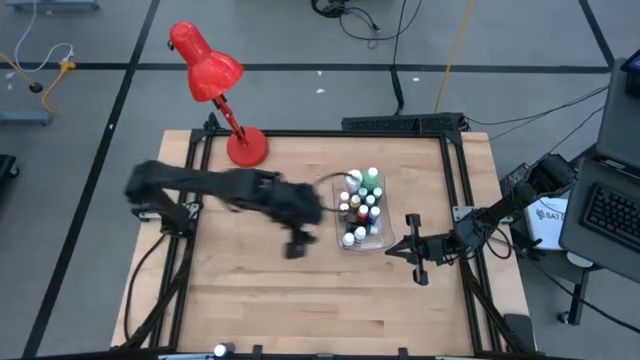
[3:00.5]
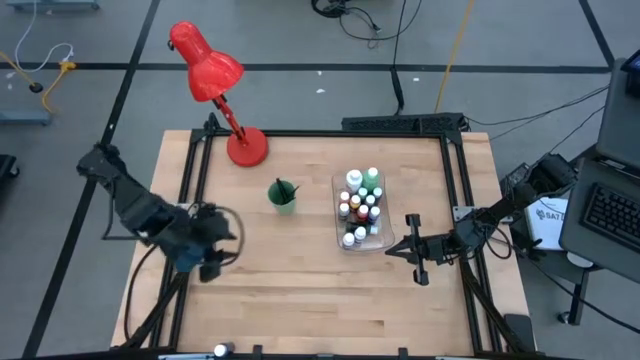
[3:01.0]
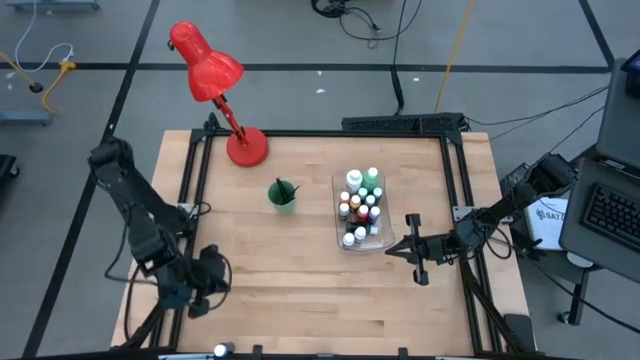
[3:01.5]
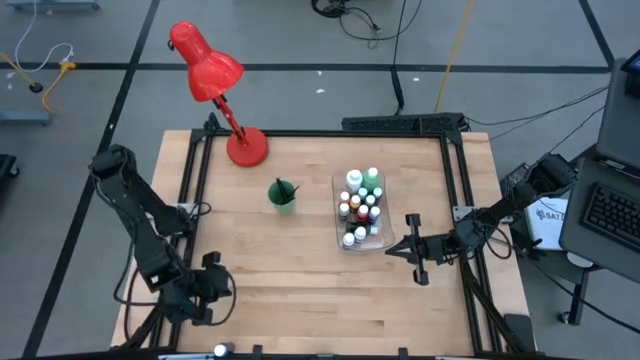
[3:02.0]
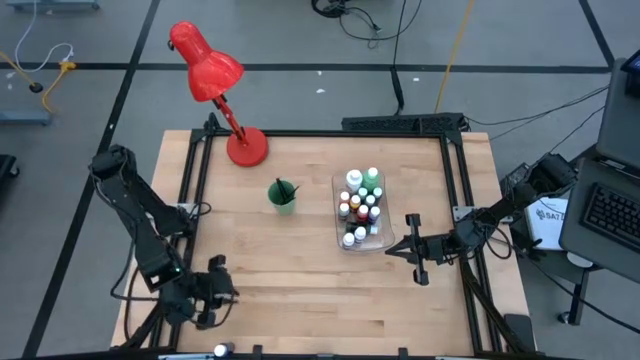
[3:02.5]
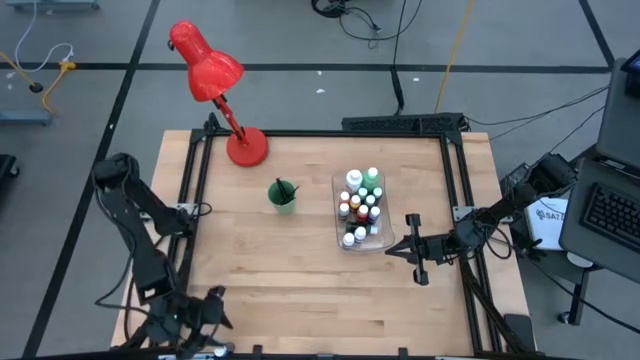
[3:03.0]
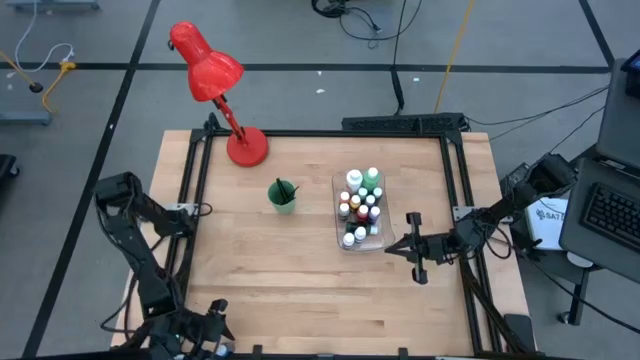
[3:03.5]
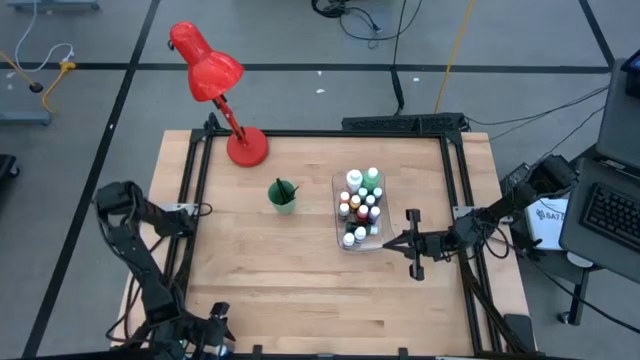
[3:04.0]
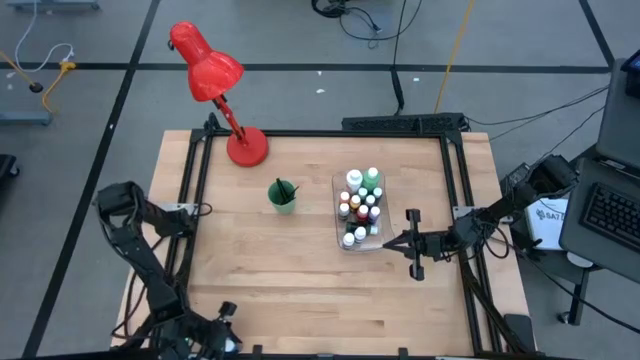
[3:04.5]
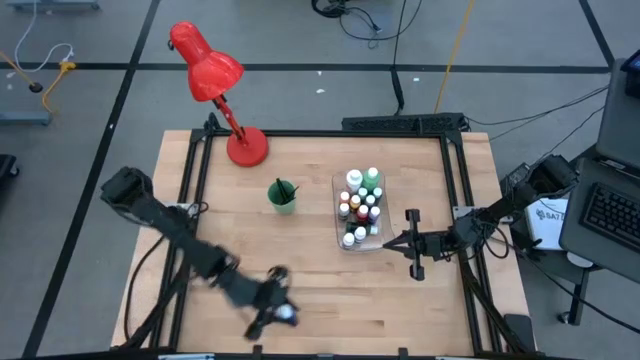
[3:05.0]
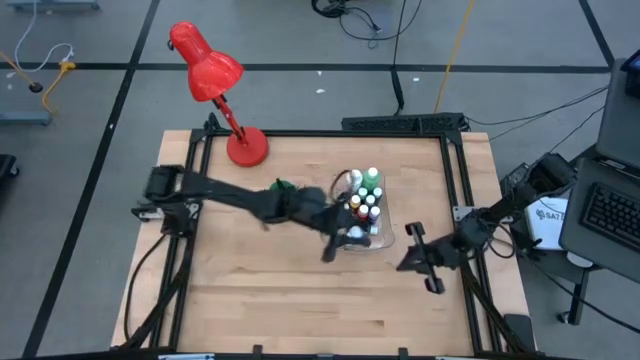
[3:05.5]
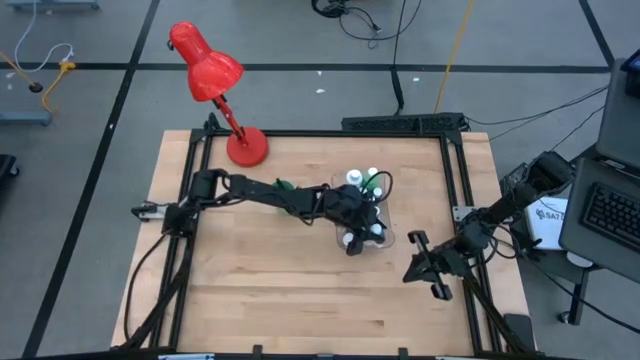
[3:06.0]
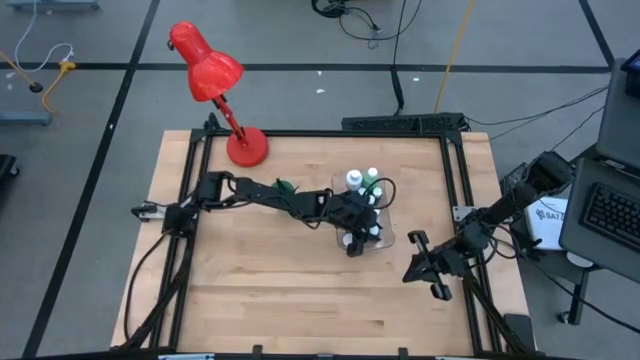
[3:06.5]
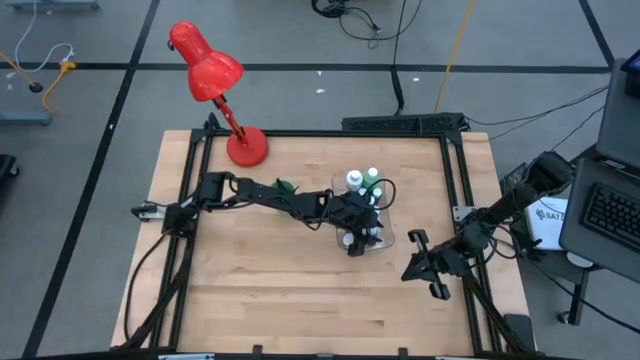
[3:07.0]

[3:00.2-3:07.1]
Task: Pick & Place Paint Supplies
Put the small blue paint bottle into the transparent bin

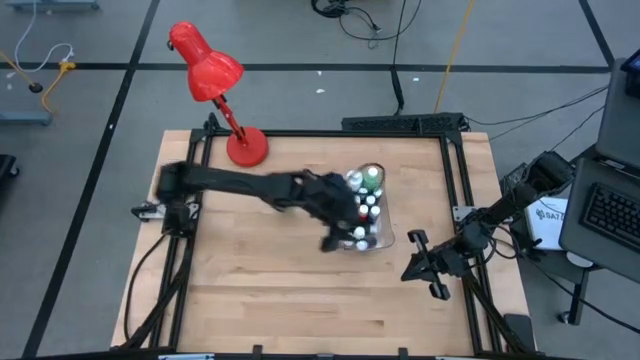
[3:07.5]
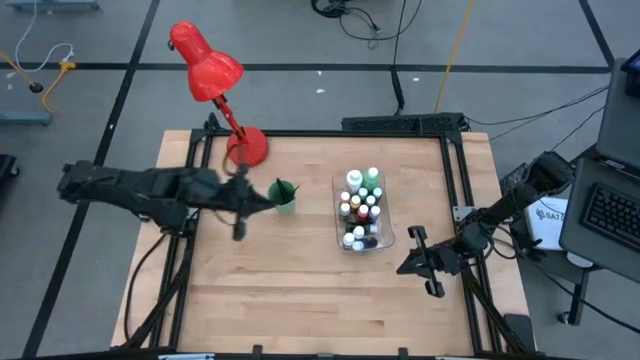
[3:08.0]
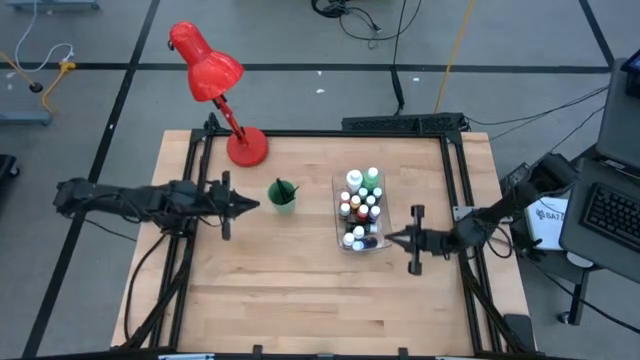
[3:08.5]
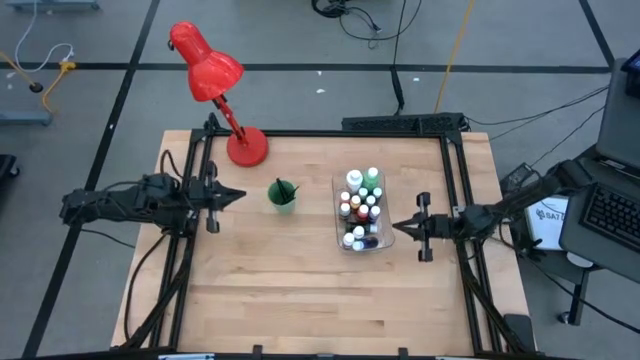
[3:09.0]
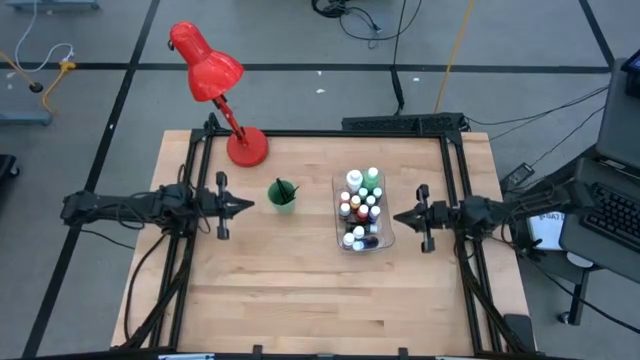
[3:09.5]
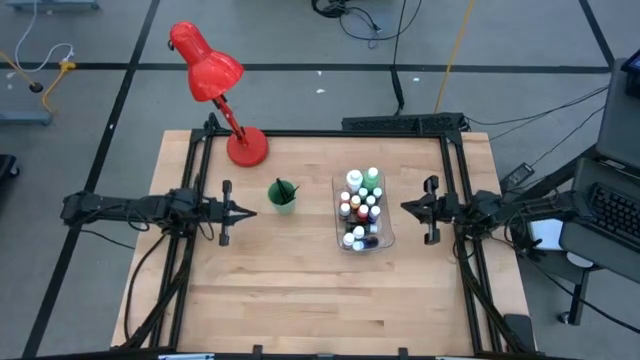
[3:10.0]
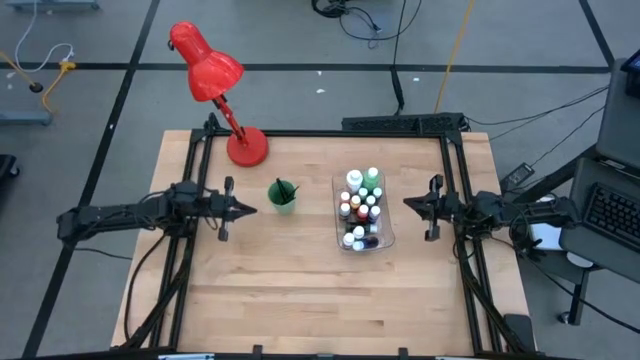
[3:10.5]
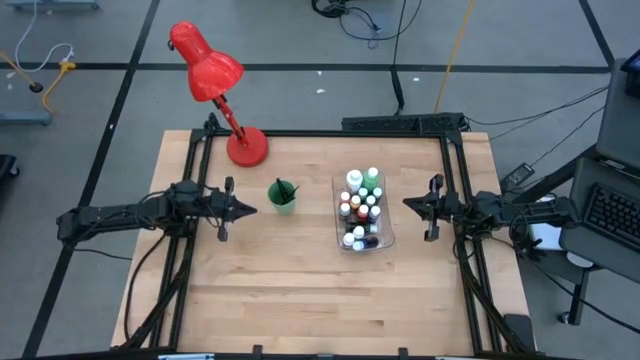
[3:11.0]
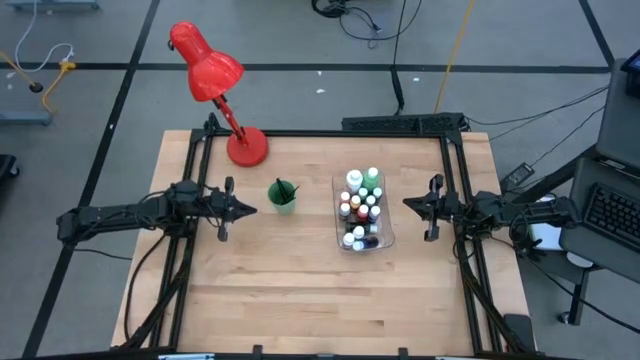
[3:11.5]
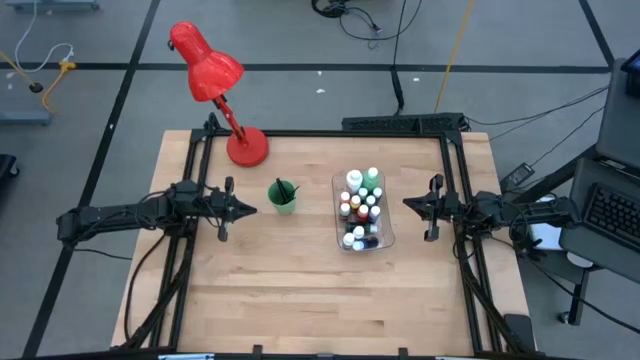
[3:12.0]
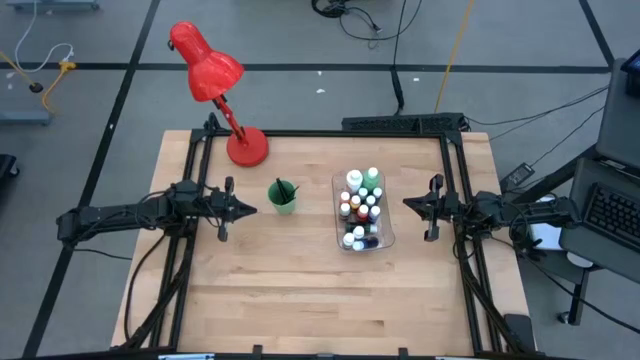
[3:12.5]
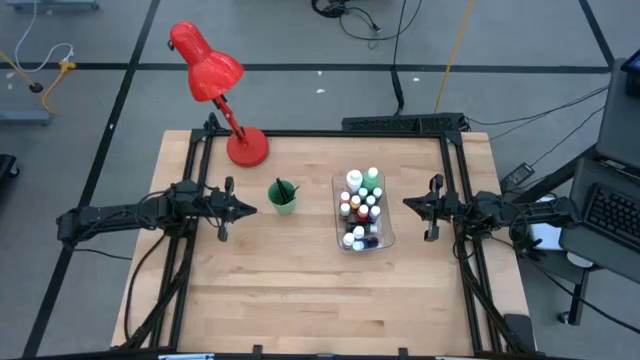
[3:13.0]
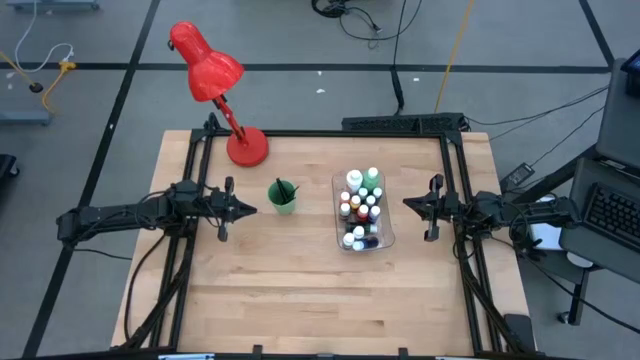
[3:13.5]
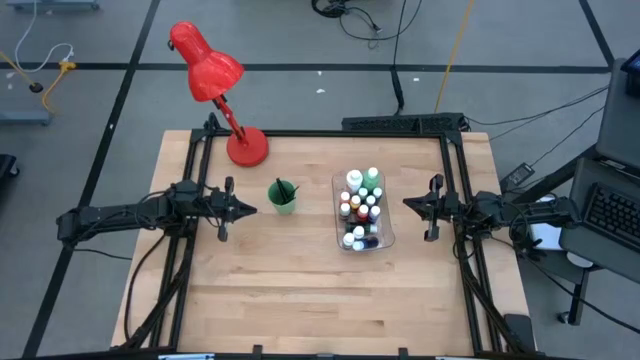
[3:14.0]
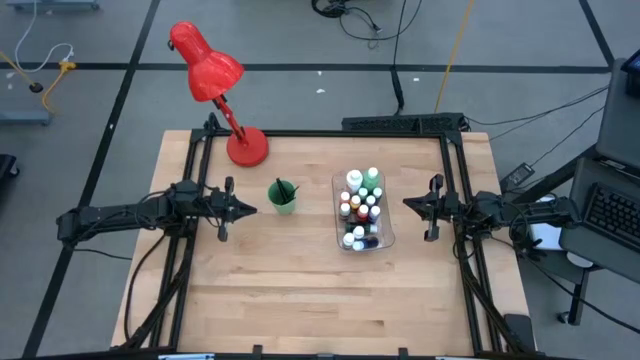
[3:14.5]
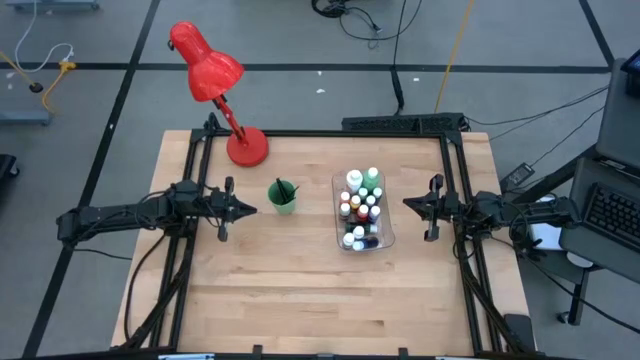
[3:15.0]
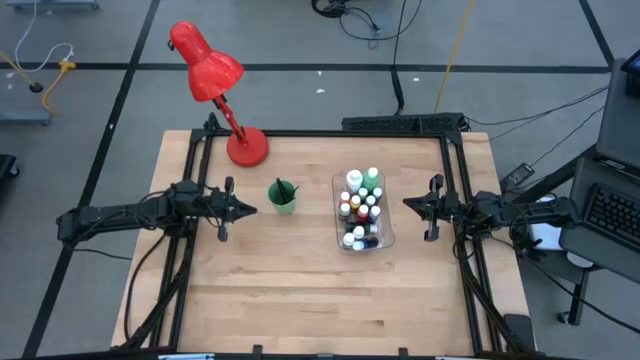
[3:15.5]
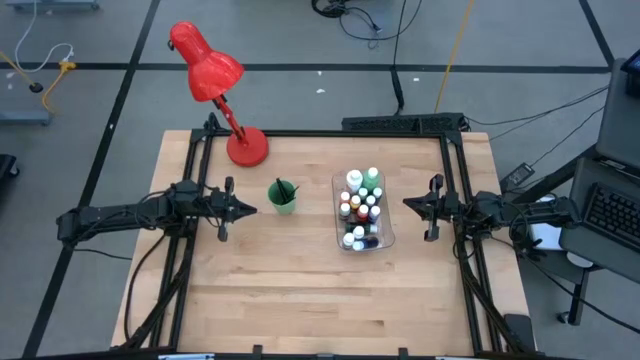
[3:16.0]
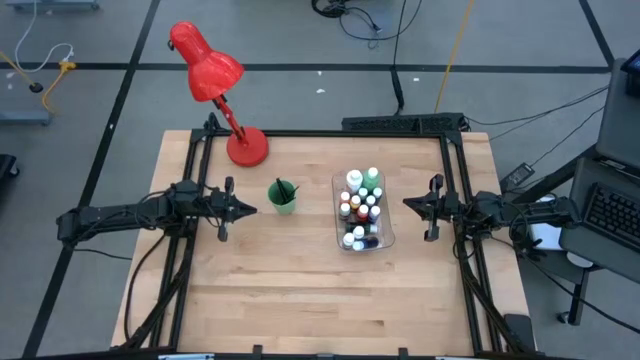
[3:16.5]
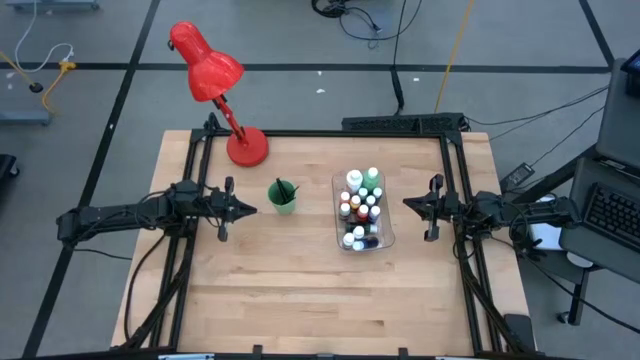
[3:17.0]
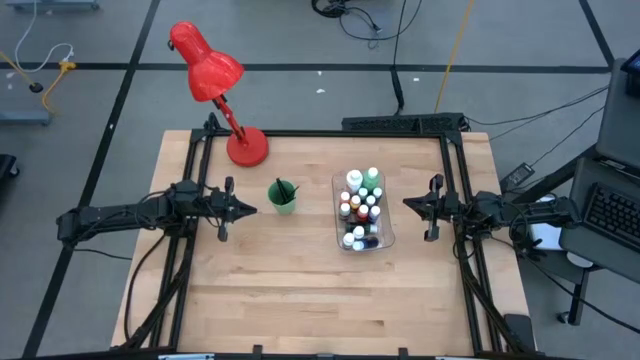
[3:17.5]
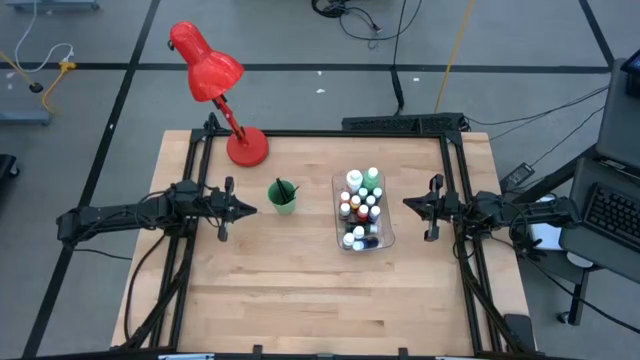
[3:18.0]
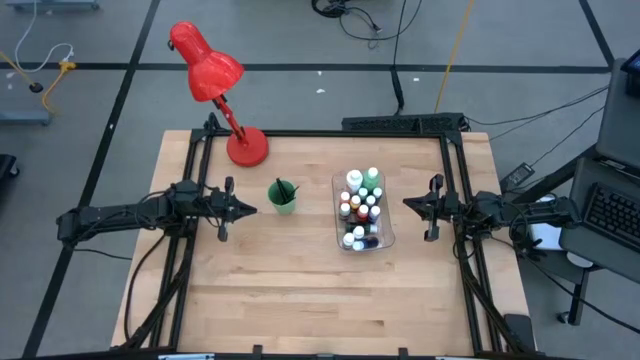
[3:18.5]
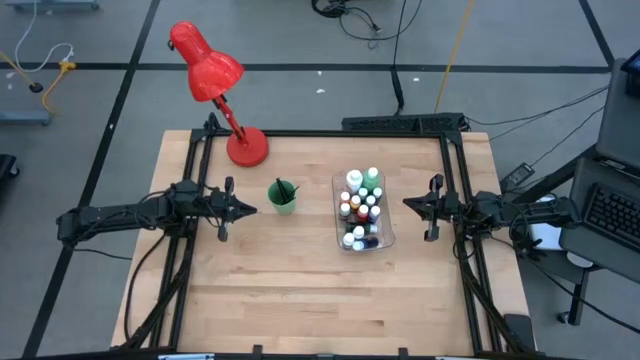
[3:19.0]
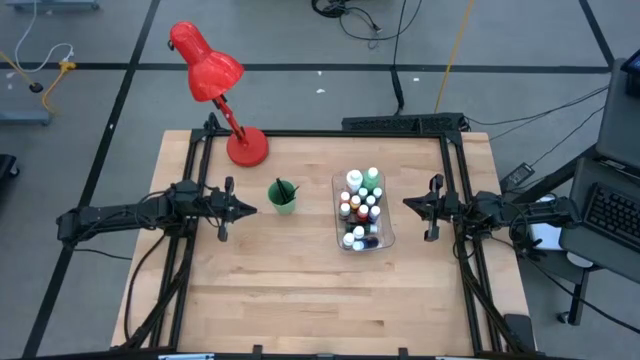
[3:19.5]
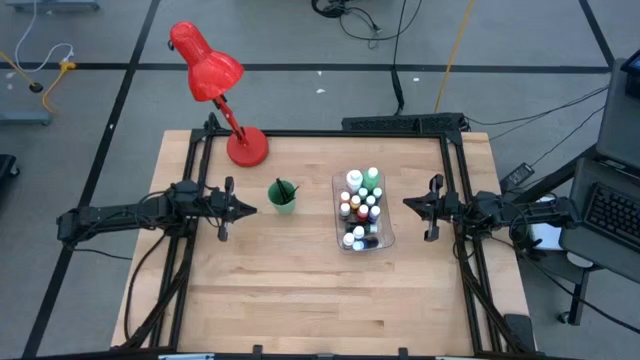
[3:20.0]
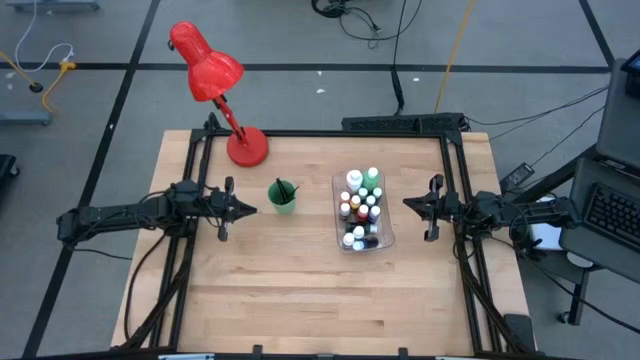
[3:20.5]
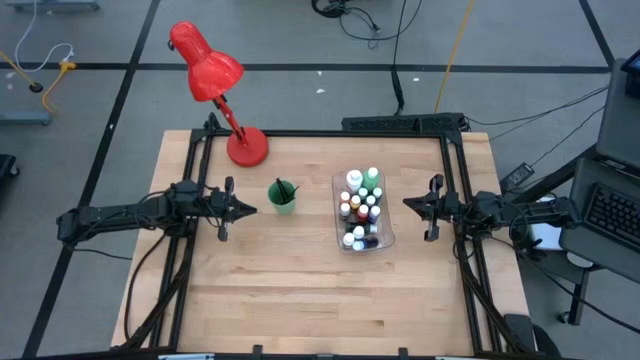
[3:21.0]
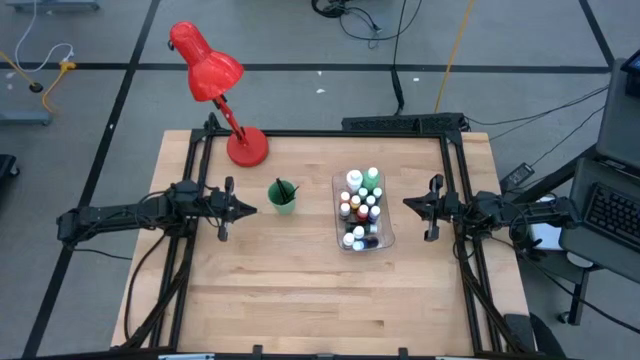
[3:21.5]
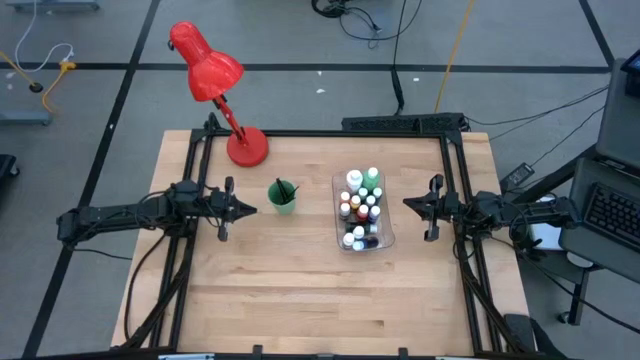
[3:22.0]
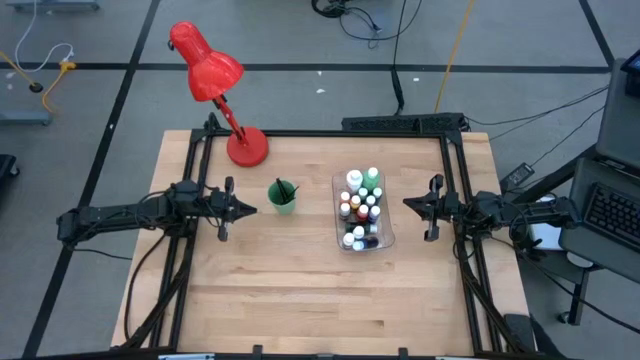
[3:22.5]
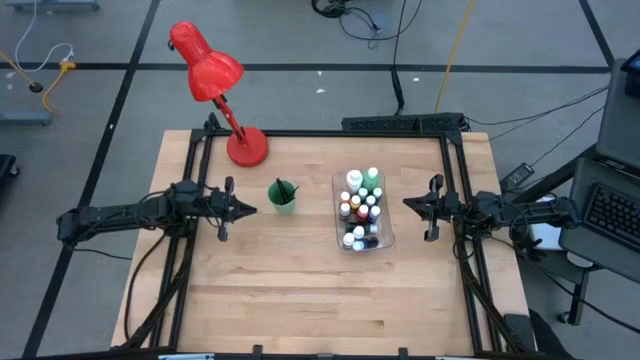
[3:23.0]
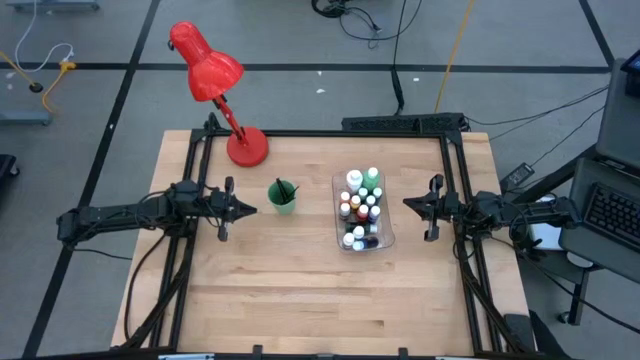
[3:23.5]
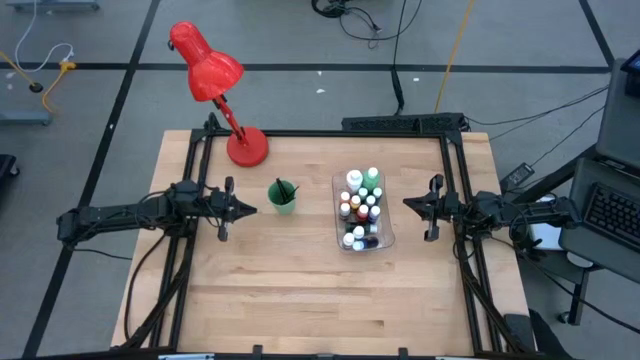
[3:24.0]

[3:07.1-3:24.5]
Return to Home Position
